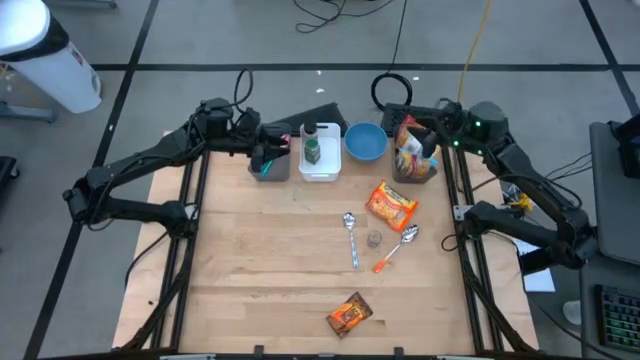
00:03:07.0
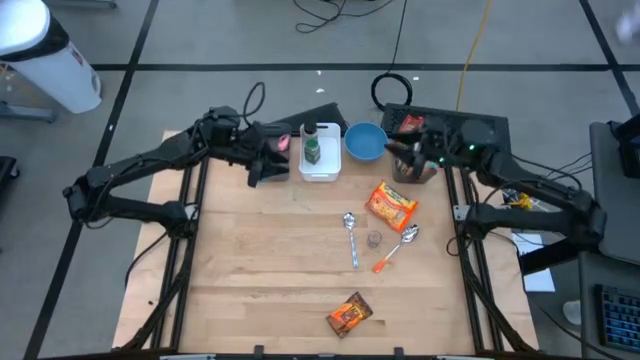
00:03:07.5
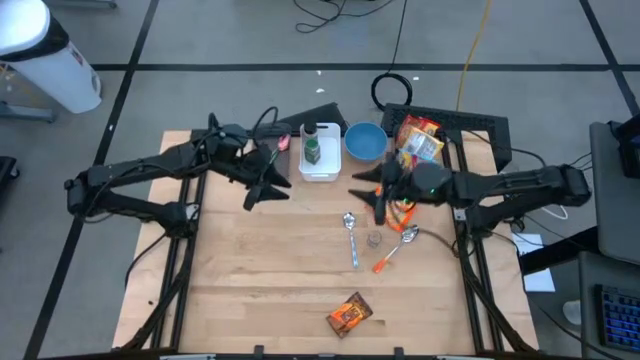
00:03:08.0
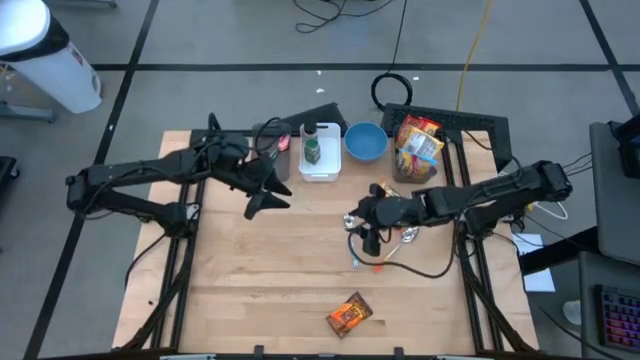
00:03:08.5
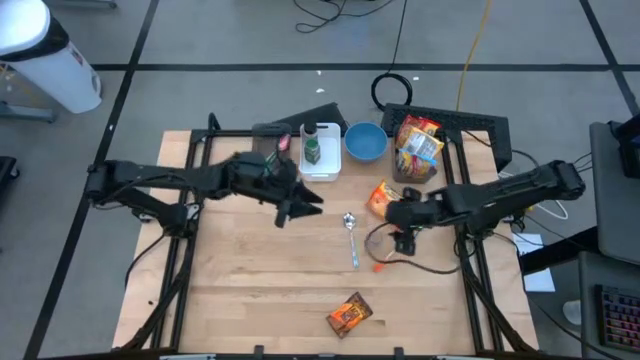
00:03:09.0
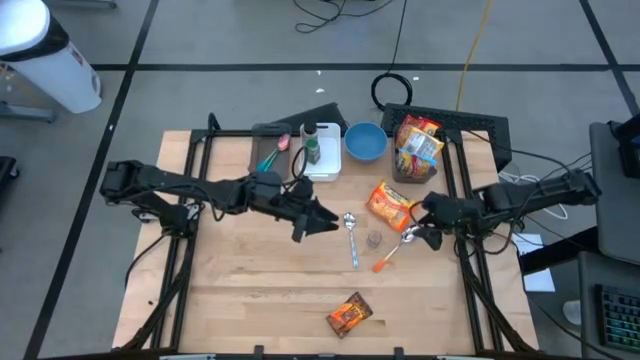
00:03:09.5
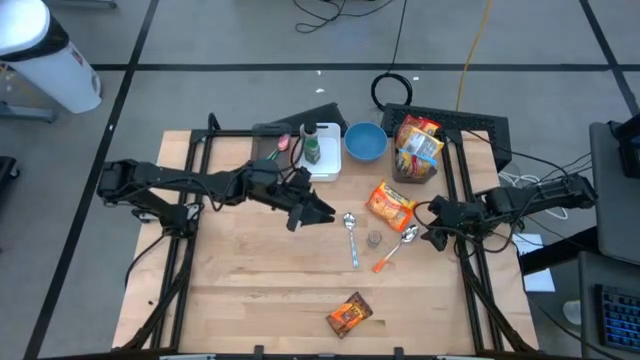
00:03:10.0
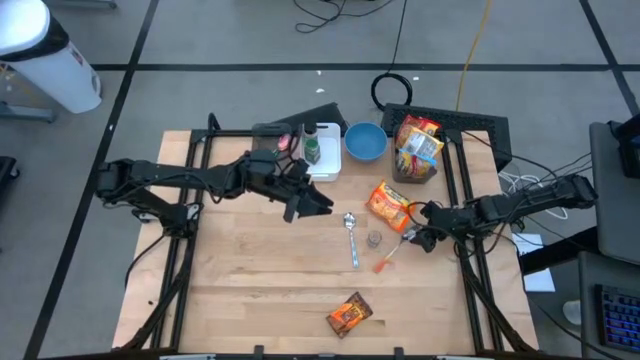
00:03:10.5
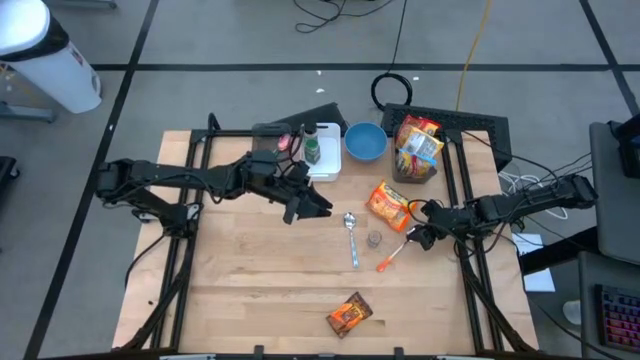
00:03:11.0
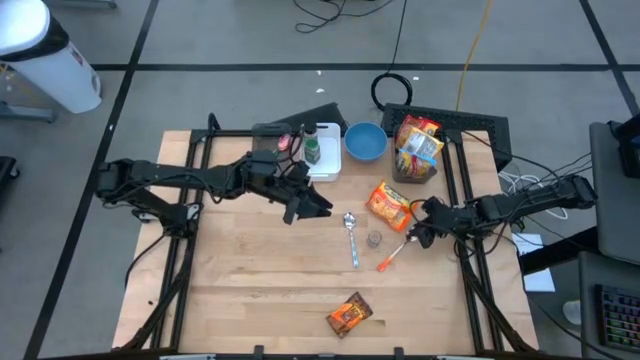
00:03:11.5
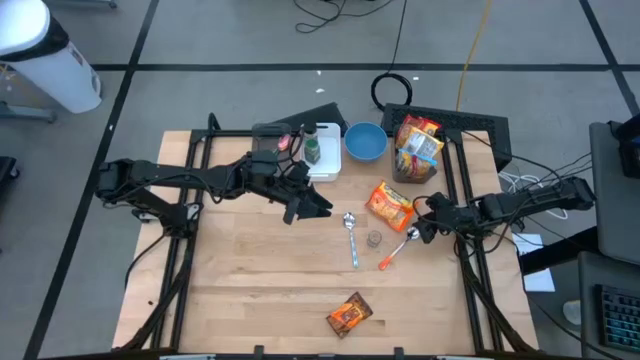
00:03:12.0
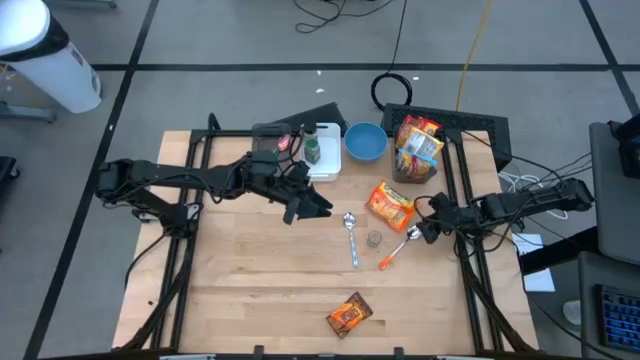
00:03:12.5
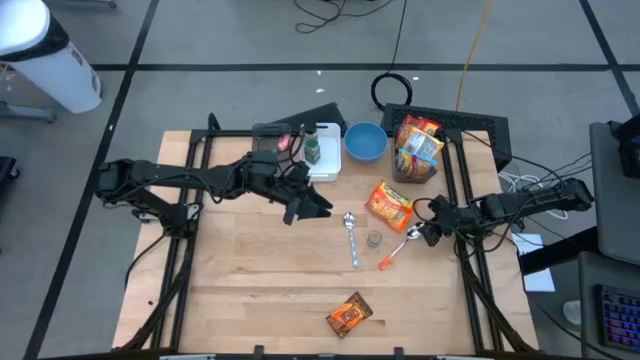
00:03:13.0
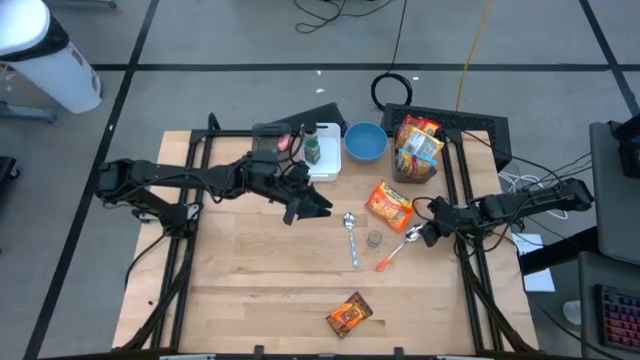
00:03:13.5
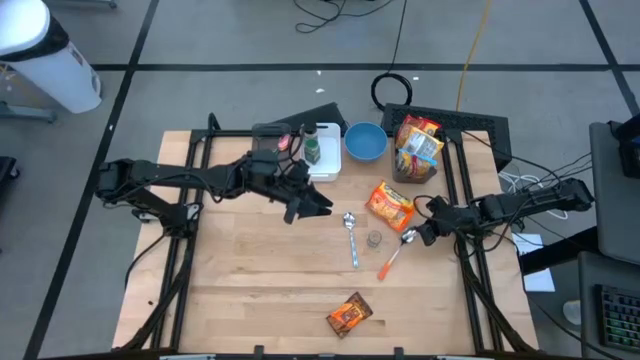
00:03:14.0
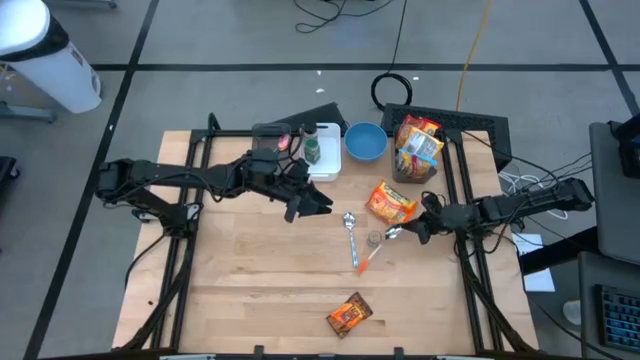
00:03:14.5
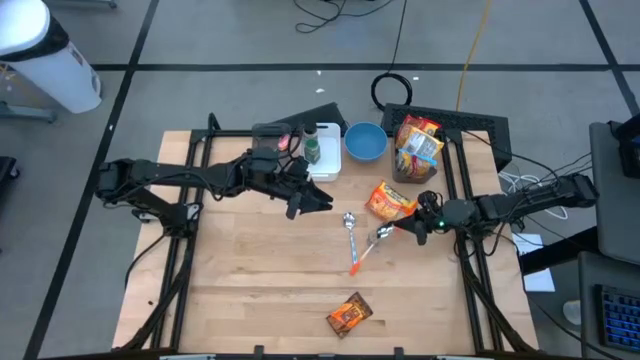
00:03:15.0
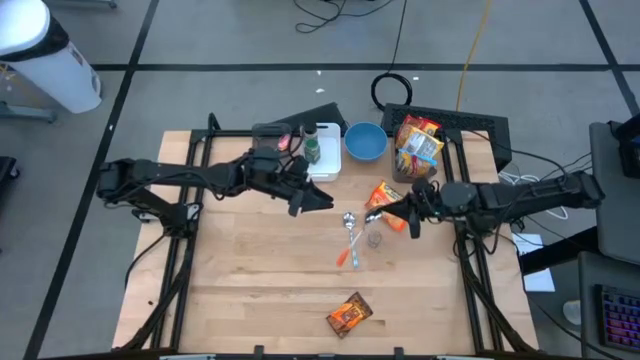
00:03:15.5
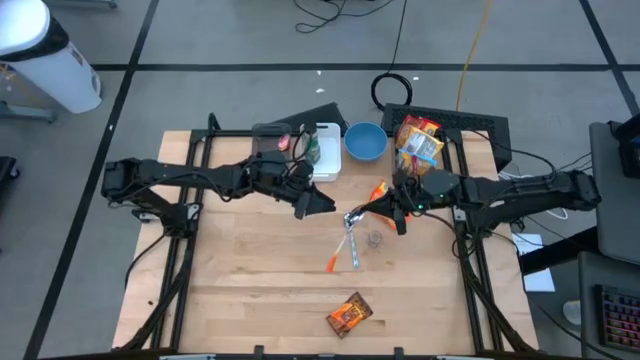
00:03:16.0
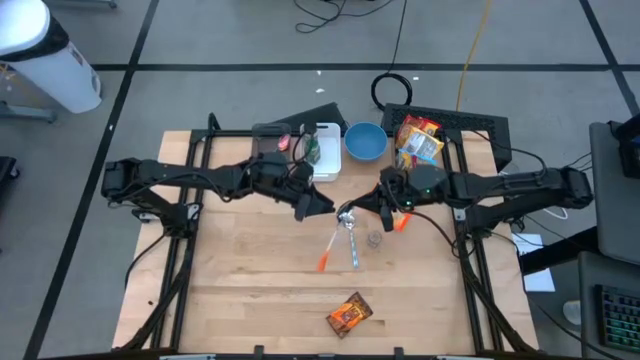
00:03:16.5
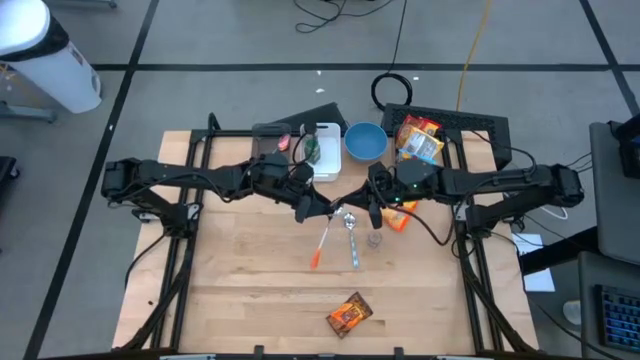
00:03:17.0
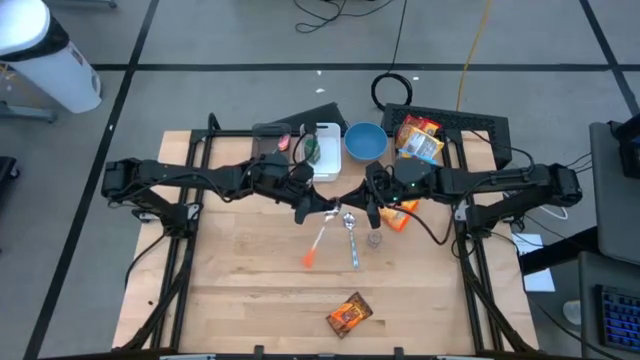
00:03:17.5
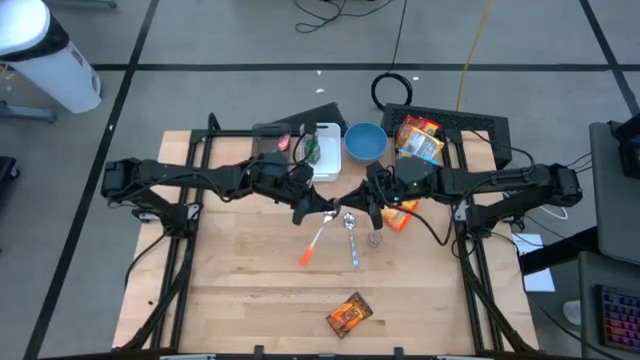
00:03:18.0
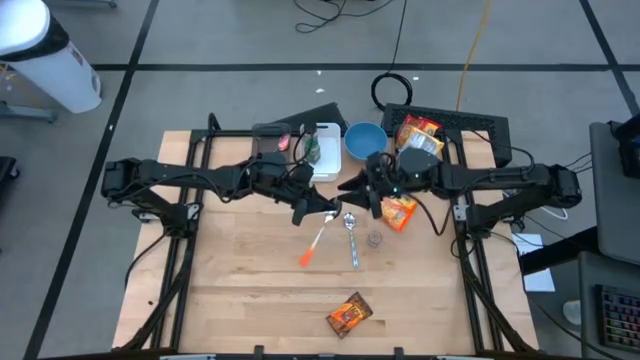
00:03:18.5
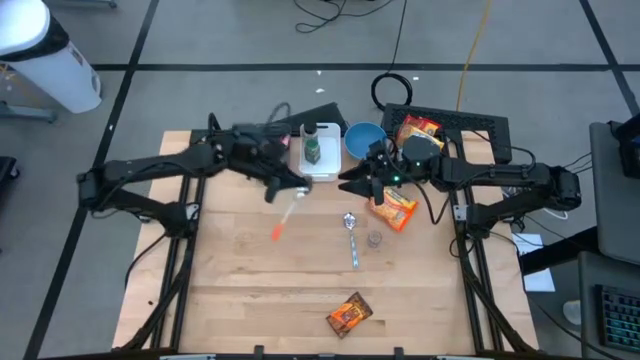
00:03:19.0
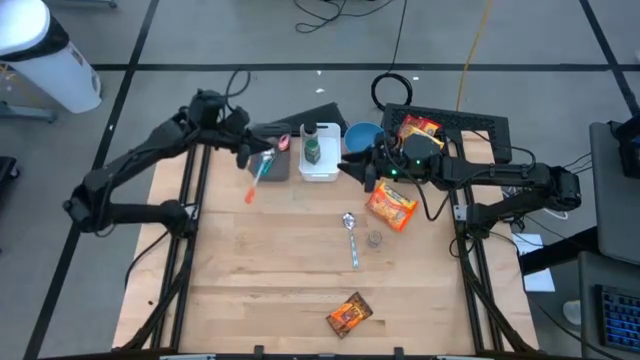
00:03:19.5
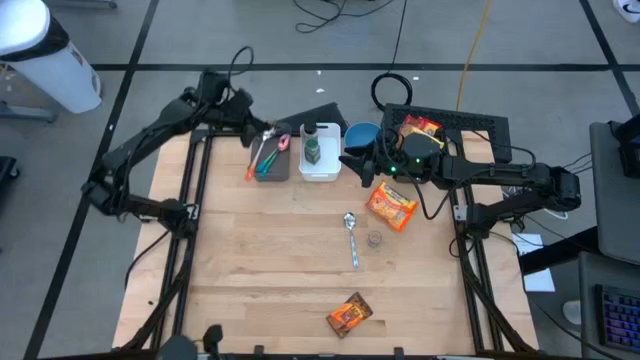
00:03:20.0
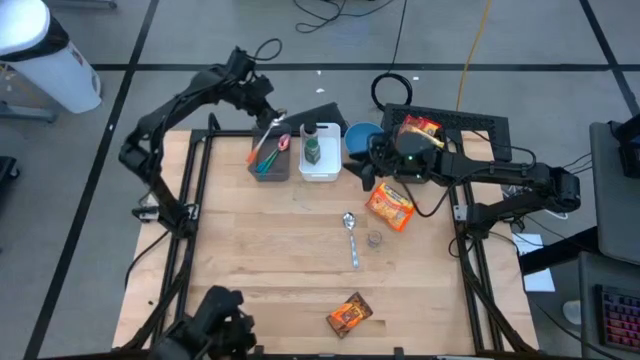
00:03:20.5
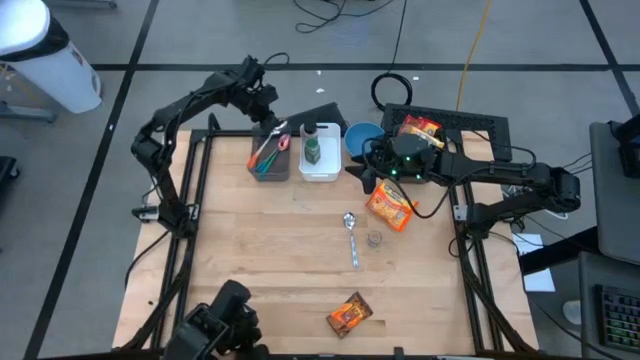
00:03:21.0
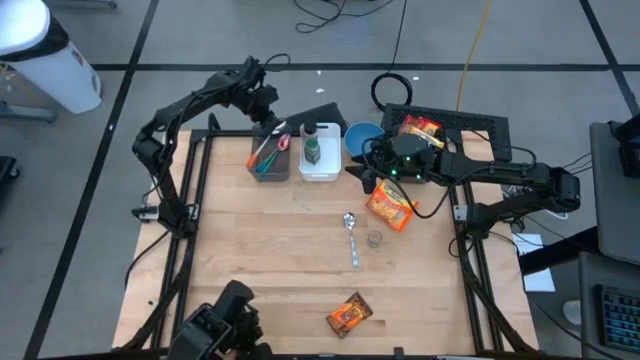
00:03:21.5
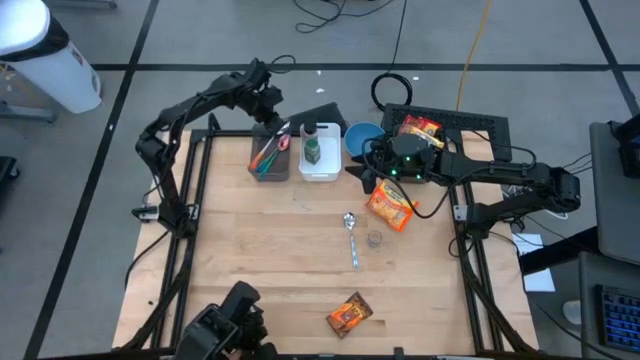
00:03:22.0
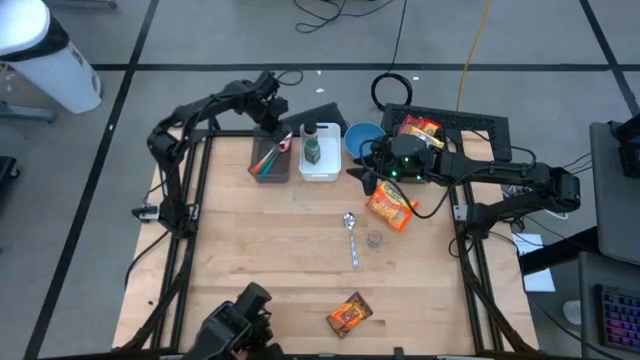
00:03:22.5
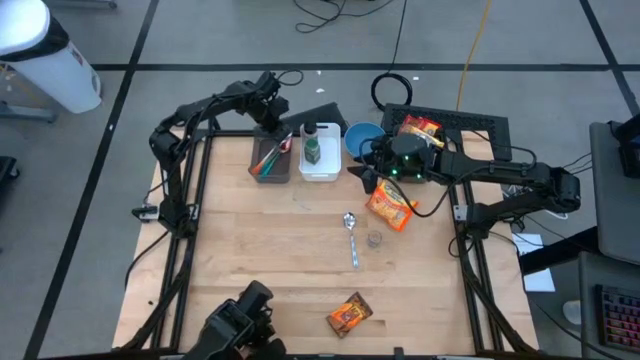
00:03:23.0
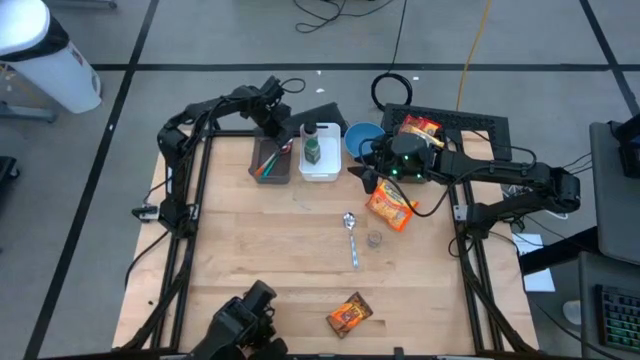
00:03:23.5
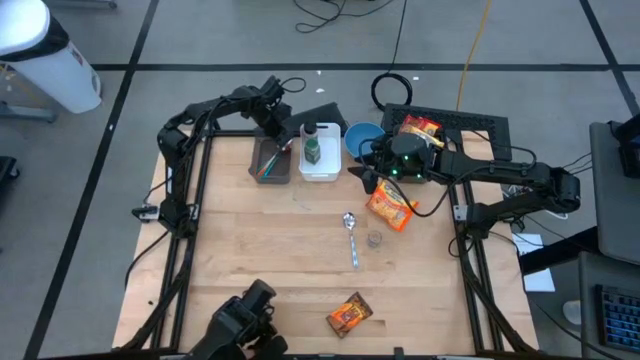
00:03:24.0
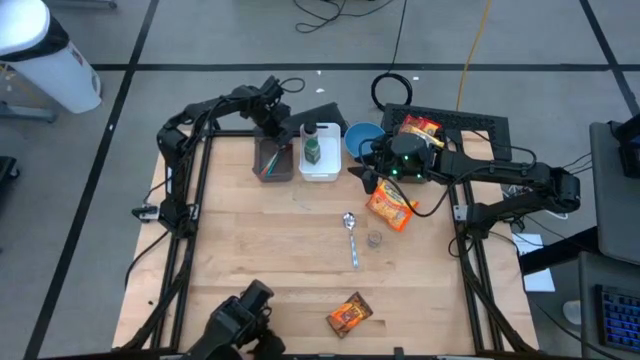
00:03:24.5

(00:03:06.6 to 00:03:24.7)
Task: Pick & Place Food Item
Put the orange spoon into the left black bin

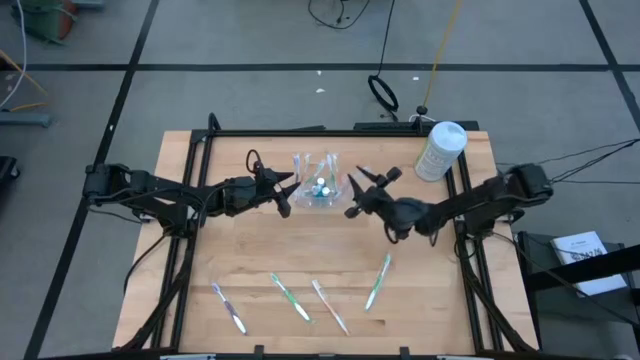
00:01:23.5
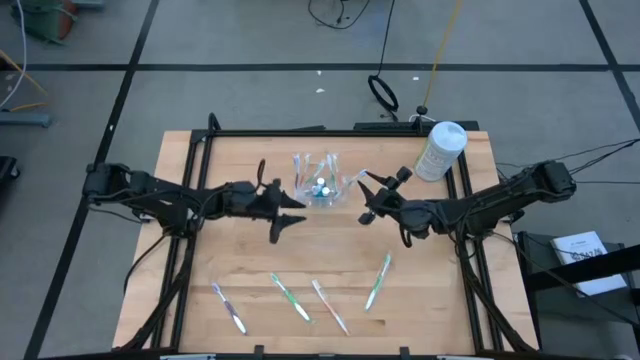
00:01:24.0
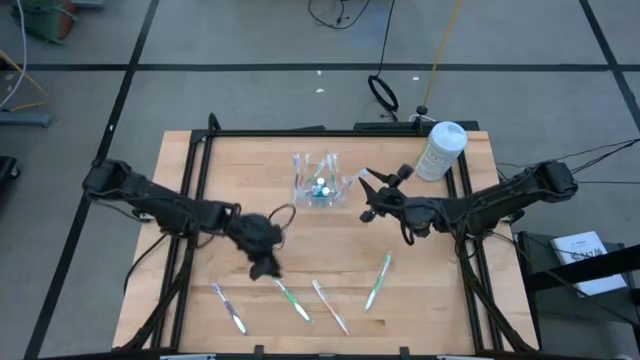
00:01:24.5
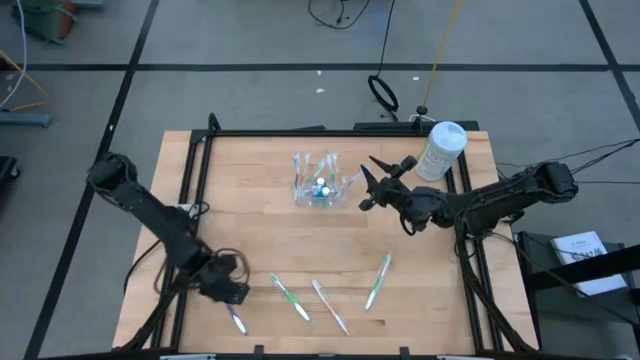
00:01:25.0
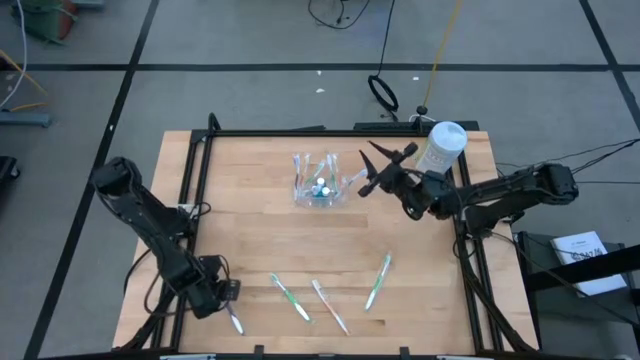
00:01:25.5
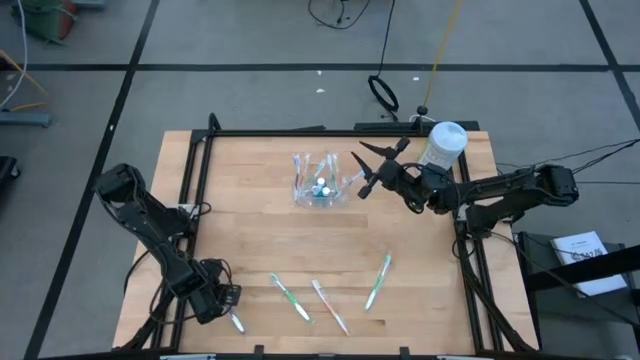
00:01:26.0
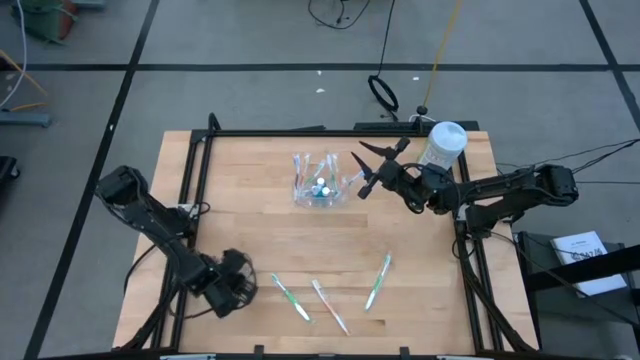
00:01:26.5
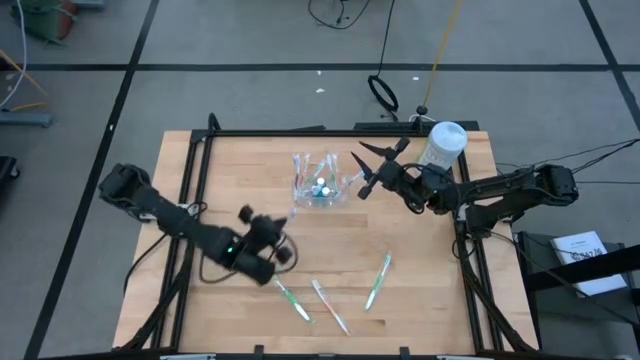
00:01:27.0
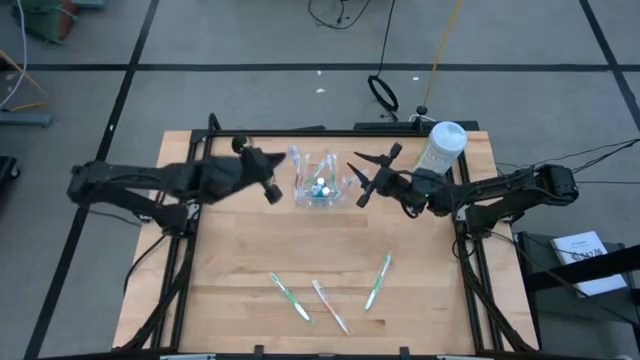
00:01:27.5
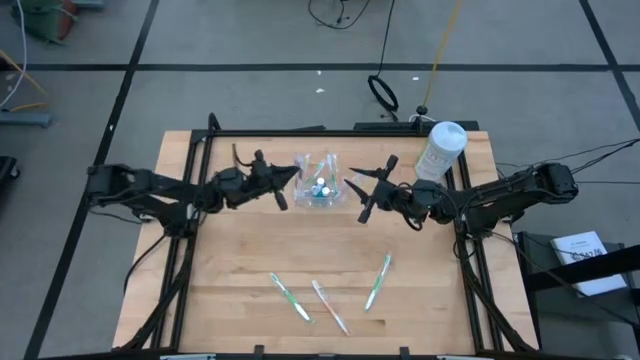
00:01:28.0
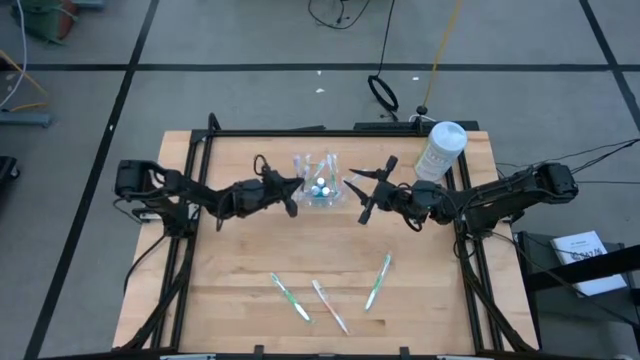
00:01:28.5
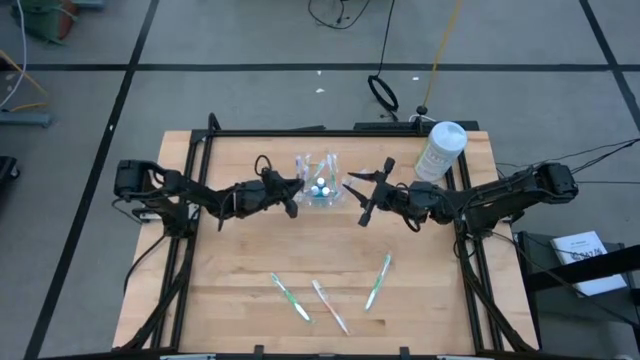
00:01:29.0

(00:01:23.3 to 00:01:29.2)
Task: Pick & Place Toothbrushes
Put the purple toothbrush into the transparent organizer
